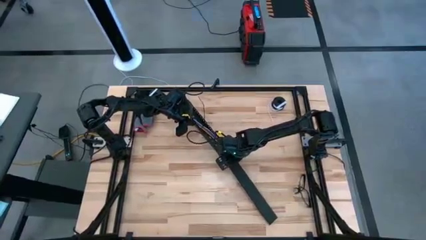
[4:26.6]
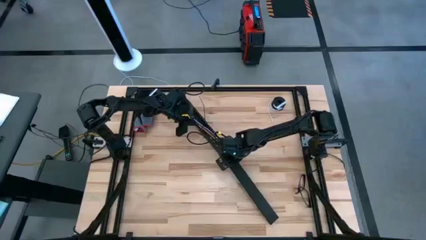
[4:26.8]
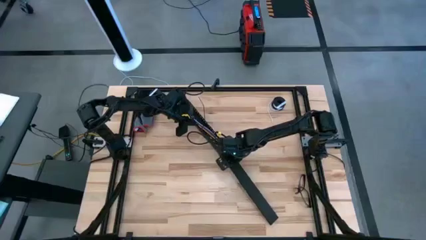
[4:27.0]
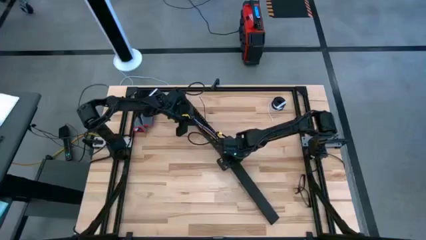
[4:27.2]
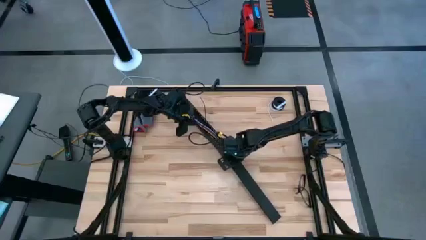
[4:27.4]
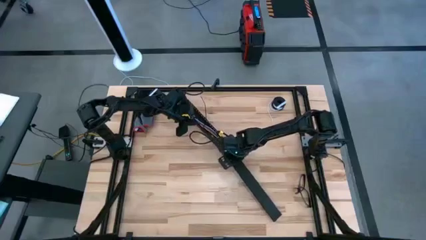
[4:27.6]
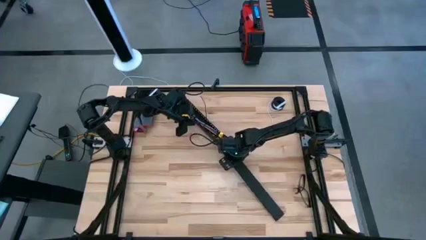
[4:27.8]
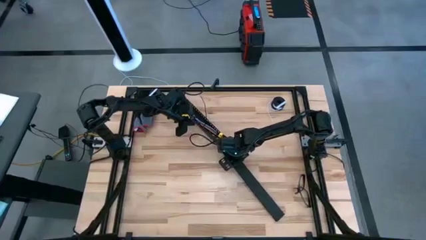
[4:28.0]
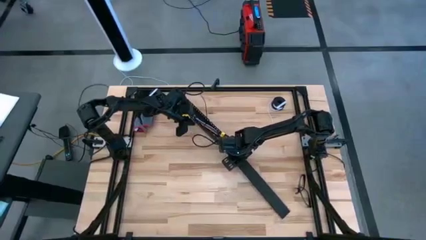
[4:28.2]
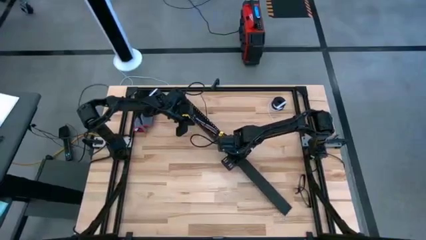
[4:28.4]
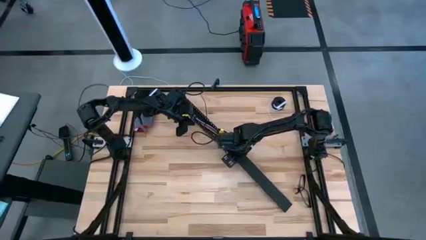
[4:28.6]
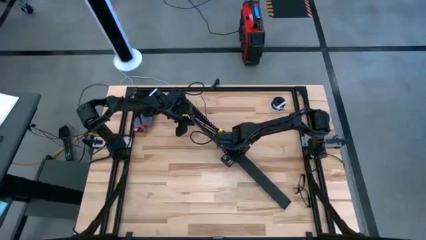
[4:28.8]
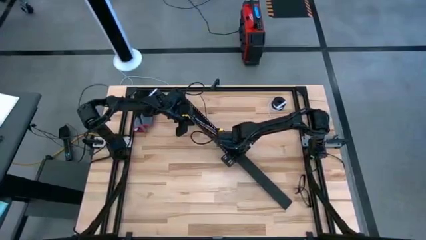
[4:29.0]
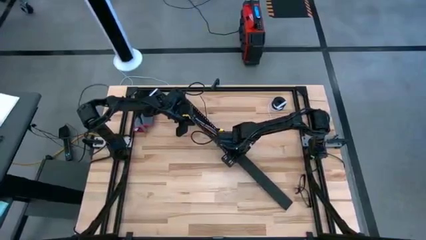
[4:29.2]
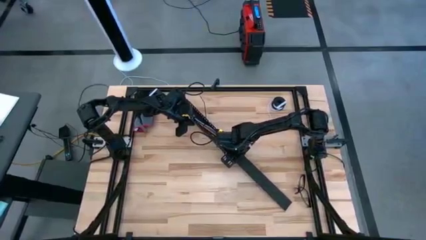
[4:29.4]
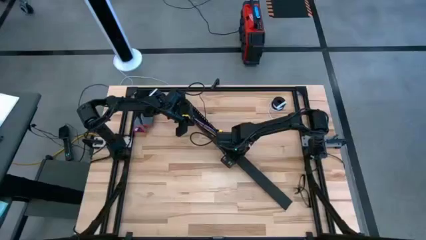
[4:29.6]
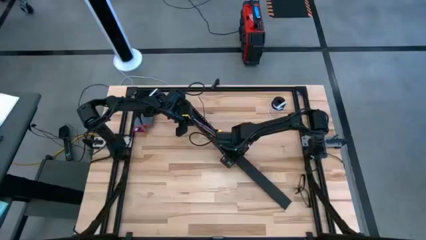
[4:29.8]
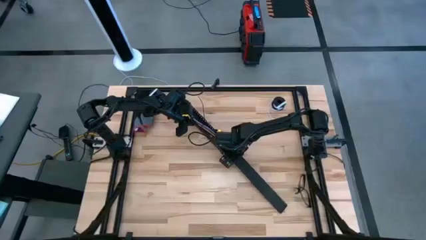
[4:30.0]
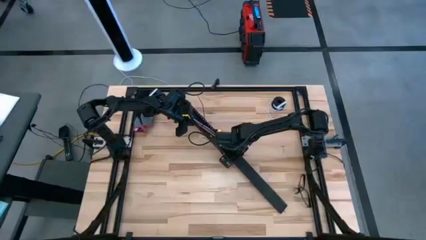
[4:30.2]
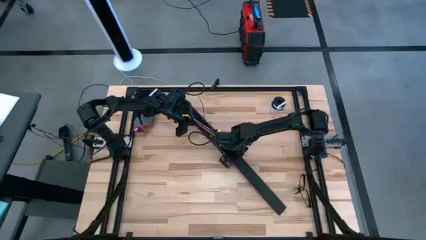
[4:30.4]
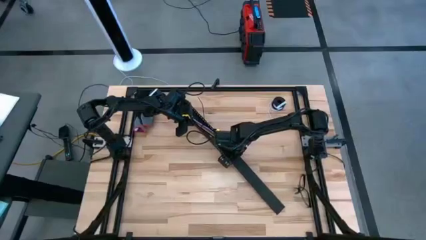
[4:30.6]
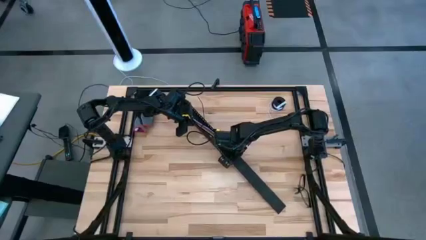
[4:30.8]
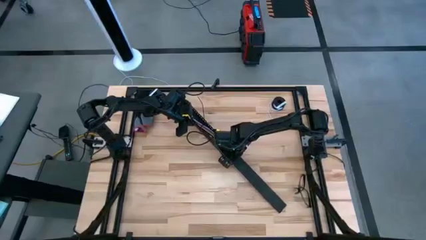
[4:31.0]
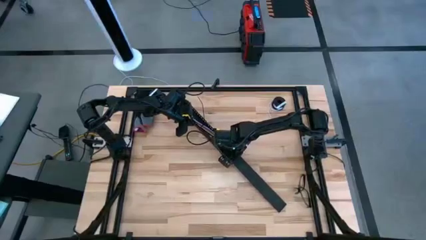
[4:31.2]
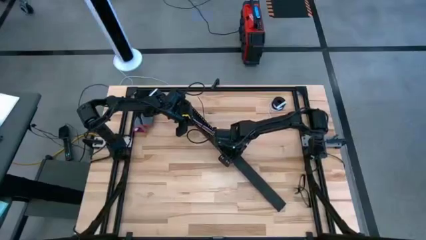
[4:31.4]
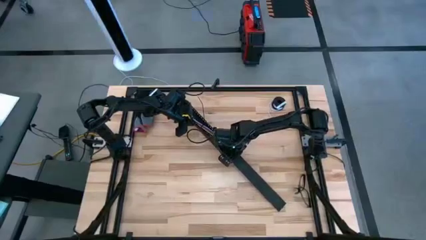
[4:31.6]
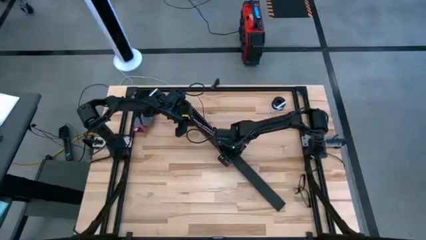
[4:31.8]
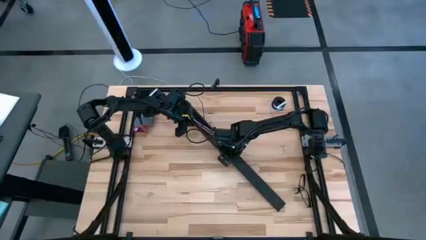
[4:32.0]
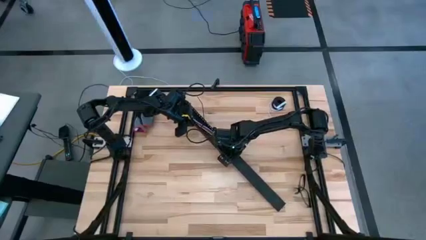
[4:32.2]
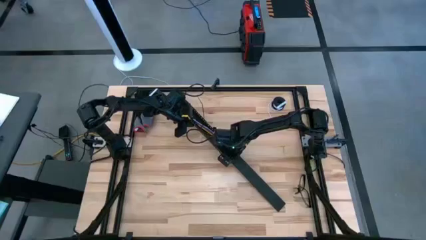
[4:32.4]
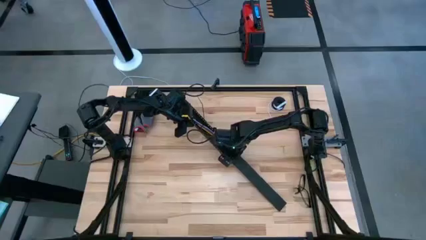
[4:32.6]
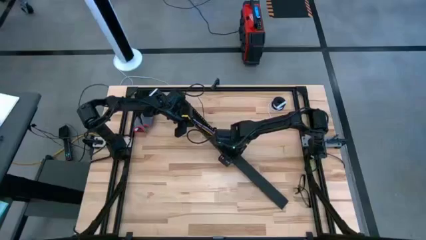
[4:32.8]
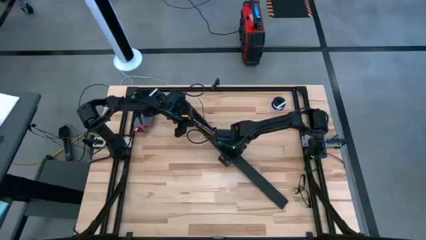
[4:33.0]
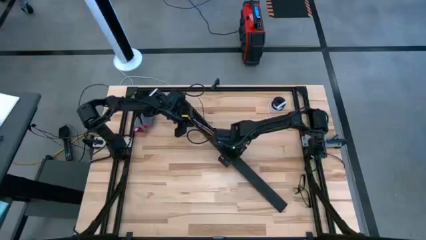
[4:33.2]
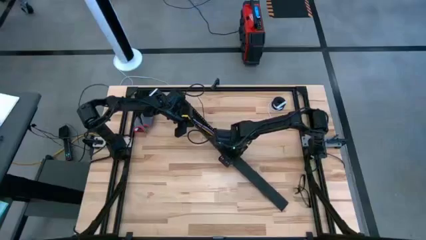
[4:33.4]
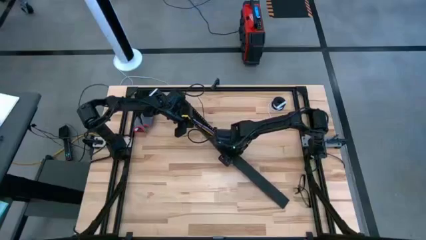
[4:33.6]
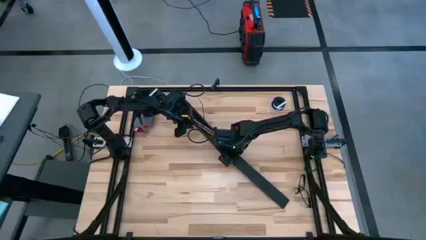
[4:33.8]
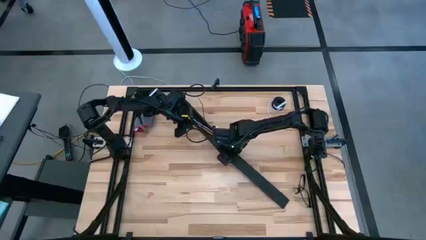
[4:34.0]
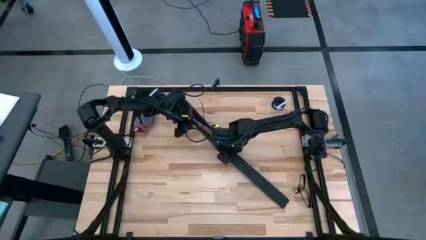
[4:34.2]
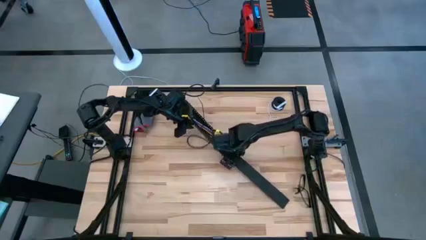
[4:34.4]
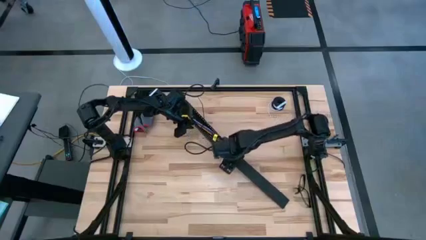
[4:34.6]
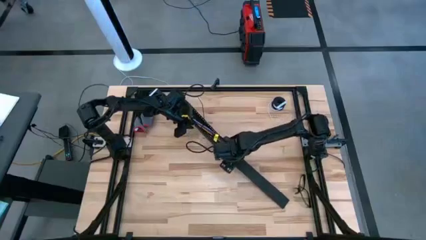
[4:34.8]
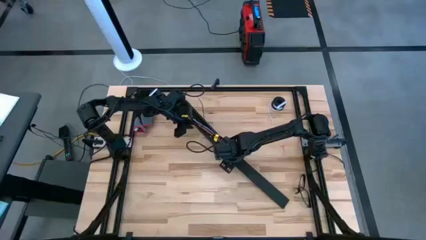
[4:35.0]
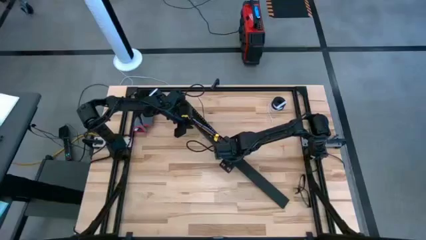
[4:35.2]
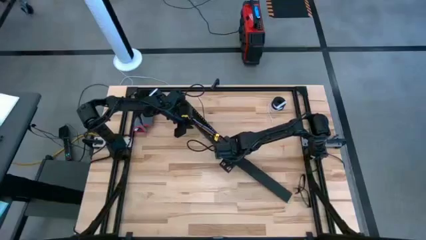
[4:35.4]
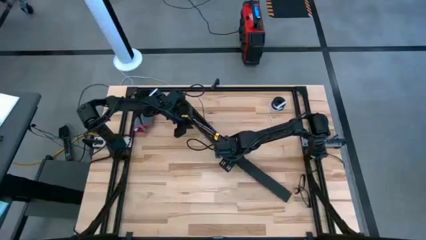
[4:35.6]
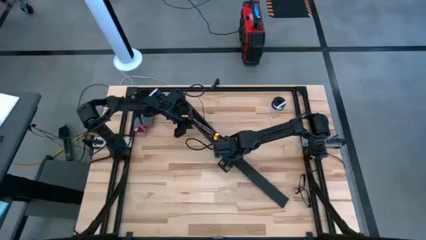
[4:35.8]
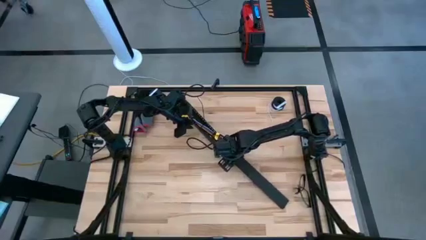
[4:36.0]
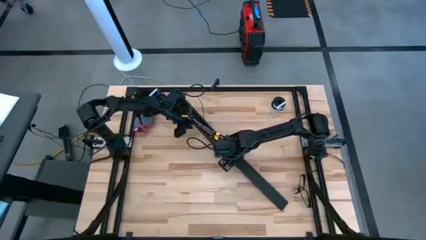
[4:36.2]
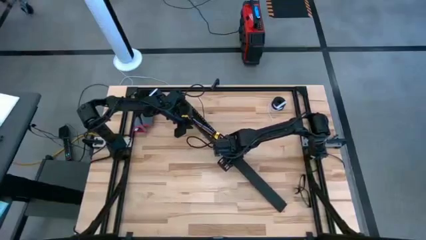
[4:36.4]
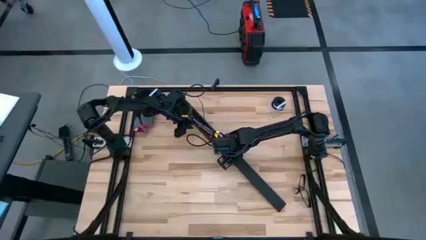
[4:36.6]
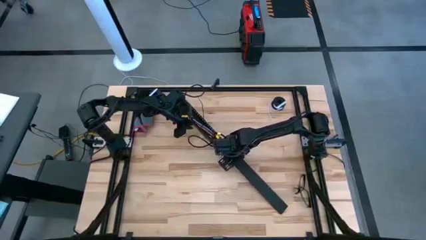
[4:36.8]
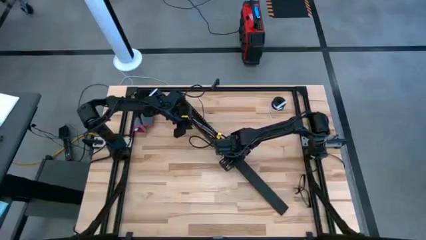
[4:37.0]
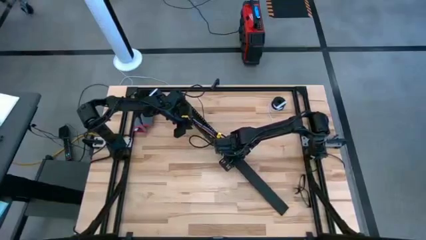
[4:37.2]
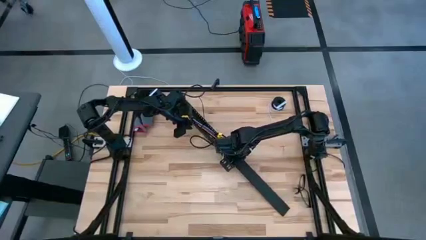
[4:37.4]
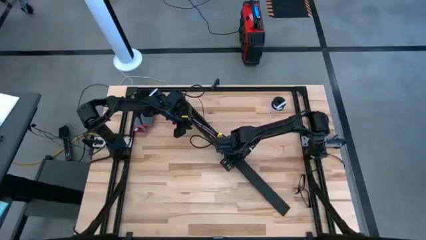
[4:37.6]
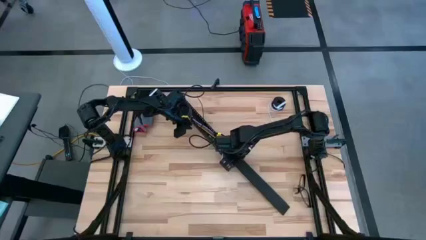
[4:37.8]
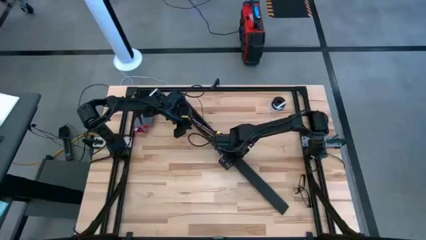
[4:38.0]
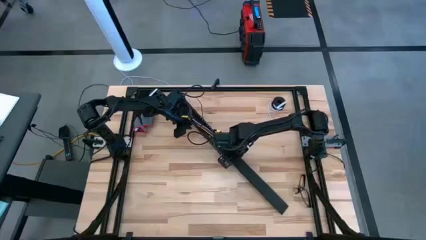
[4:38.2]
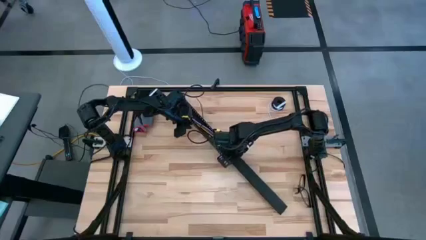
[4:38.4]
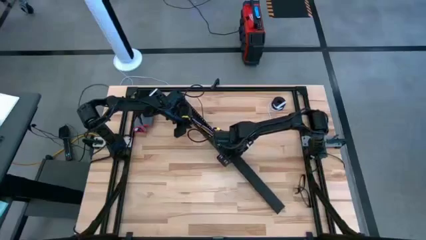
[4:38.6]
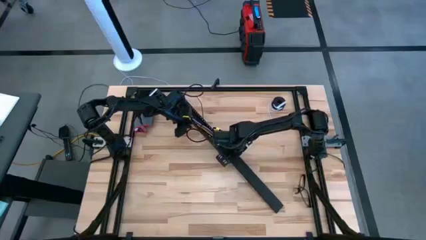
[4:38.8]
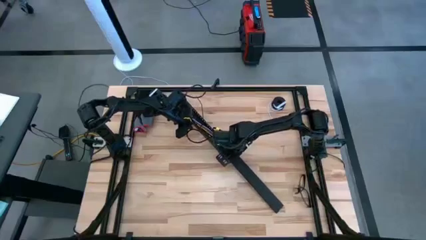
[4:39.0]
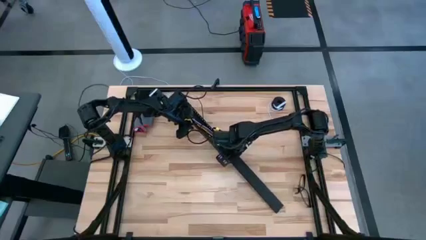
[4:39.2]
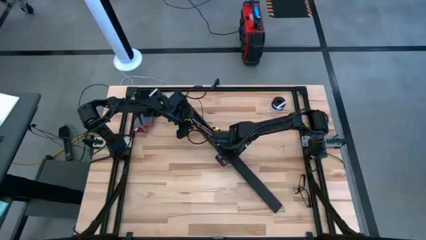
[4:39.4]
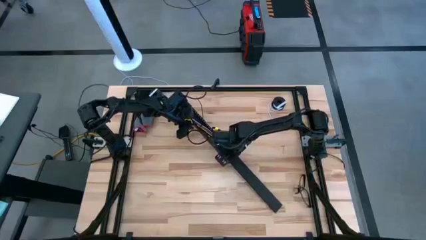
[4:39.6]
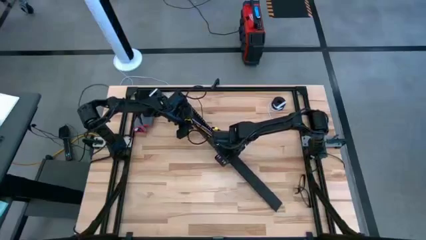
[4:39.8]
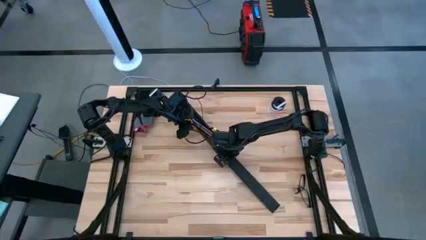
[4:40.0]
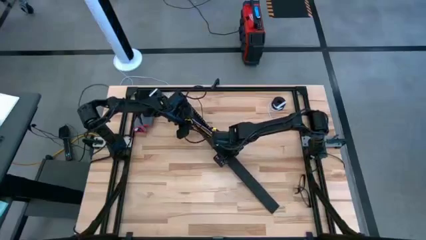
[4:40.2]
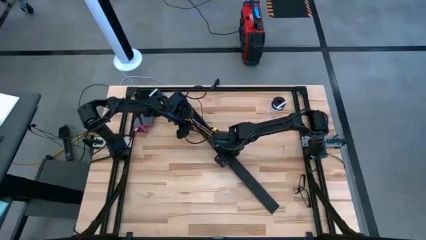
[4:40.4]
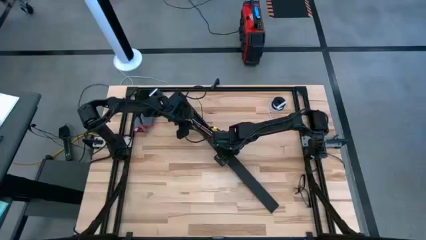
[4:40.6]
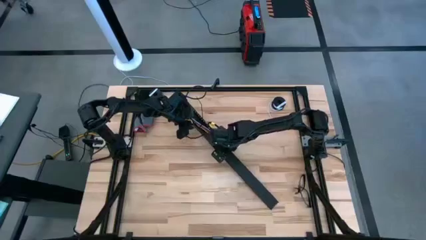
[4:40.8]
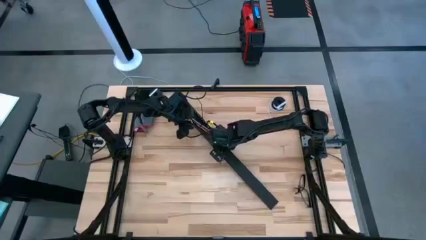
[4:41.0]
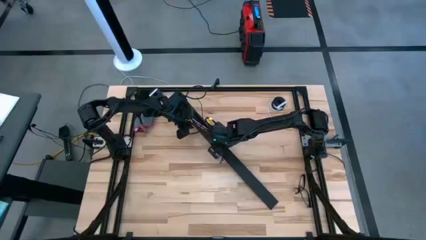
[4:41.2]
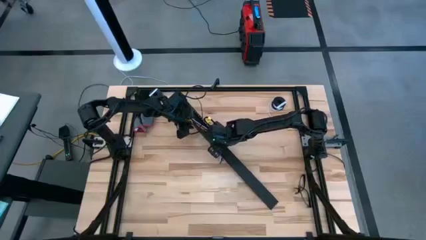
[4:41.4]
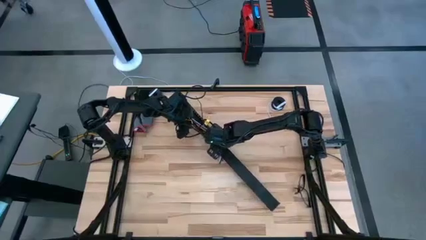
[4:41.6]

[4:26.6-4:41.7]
Task: Ziptie cables
Close the black cable duct

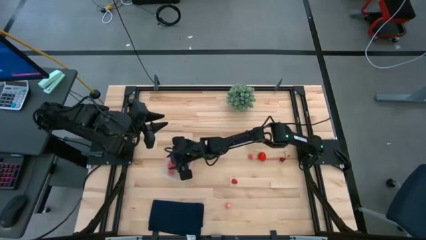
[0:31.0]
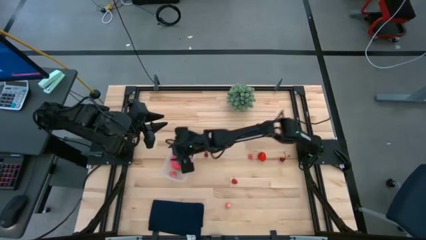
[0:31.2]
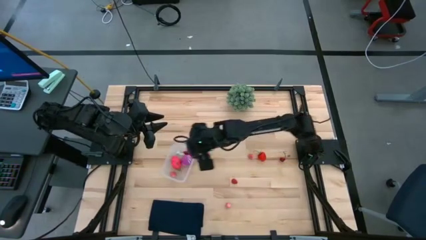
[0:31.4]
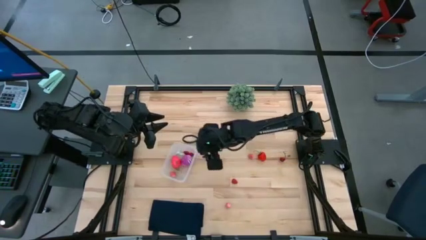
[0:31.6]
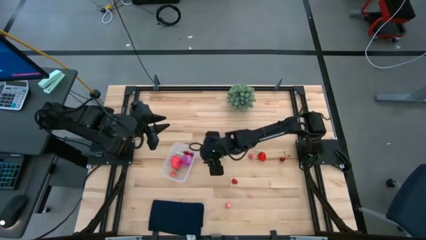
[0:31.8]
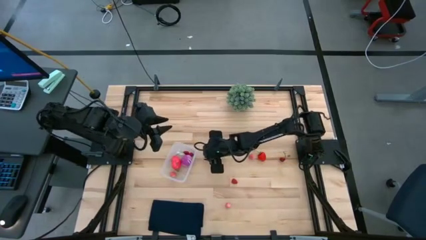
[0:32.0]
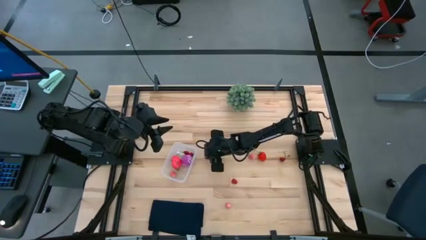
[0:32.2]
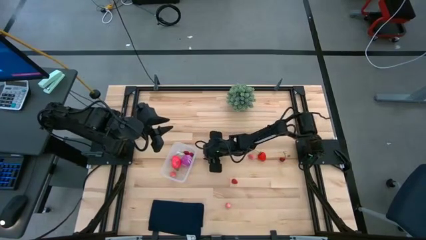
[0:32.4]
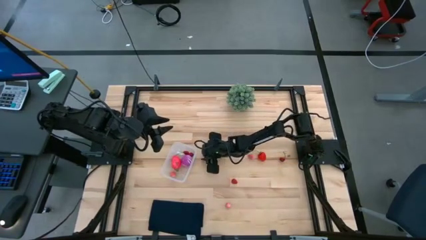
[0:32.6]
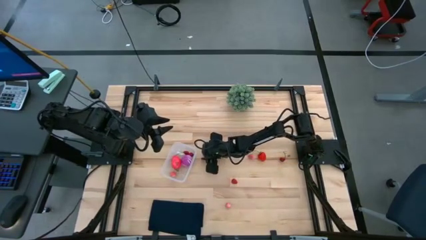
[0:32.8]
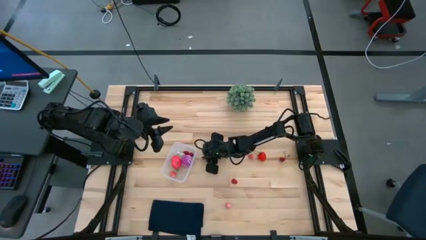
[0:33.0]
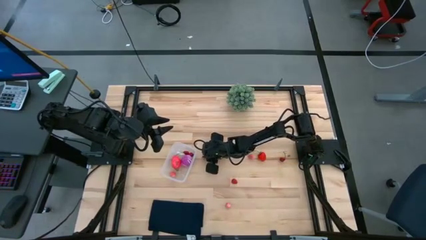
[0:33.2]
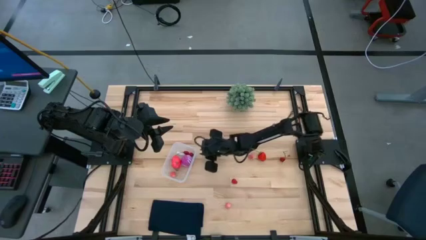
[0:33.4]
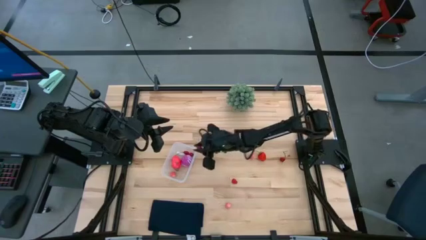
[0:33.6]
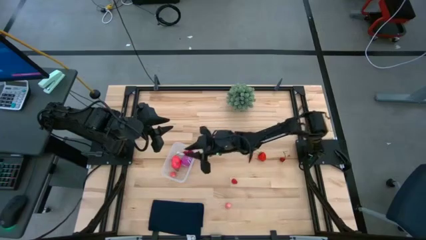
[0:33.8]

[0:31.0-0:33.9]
Task: Pick and placing Produce into tupperware
Put the red cherry into the transparent bin
